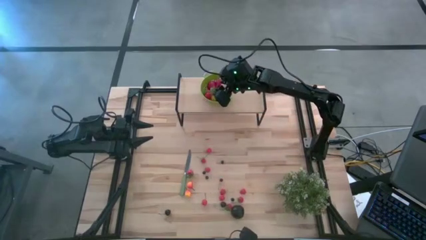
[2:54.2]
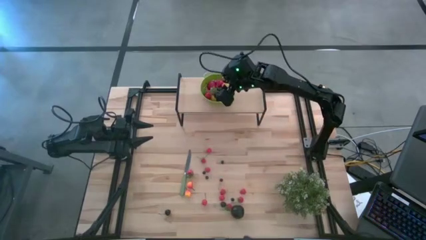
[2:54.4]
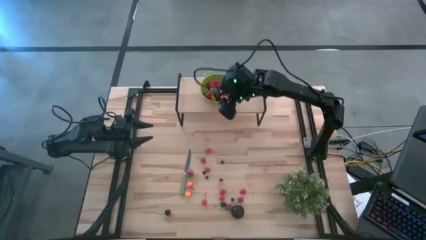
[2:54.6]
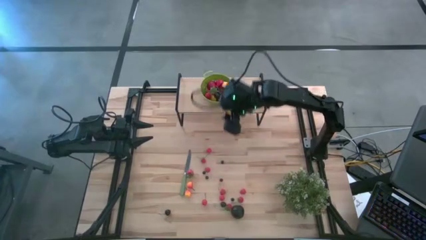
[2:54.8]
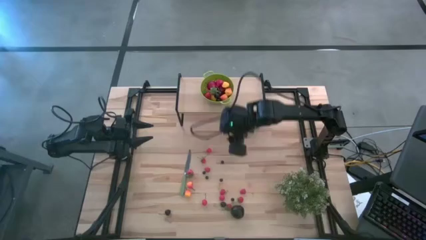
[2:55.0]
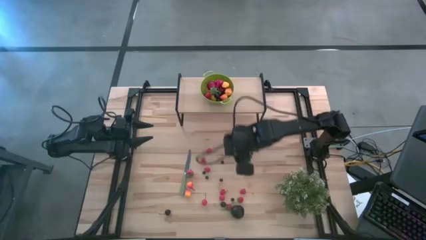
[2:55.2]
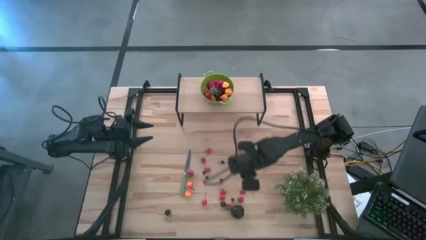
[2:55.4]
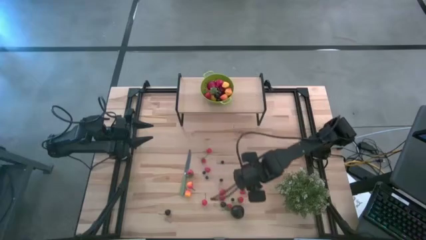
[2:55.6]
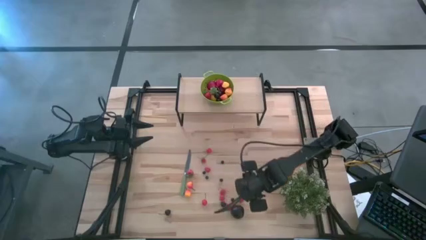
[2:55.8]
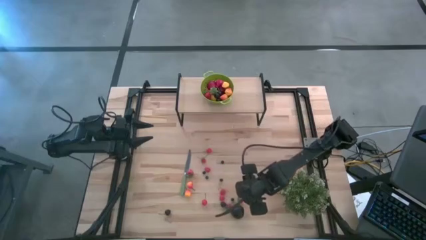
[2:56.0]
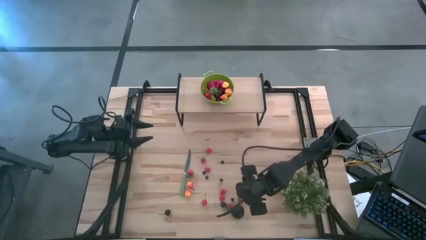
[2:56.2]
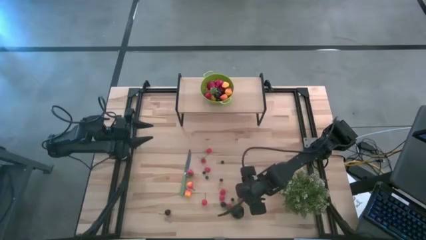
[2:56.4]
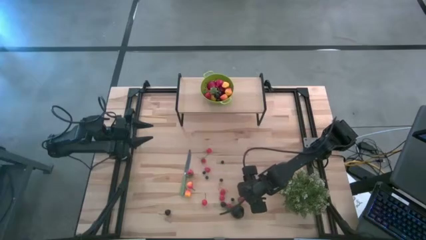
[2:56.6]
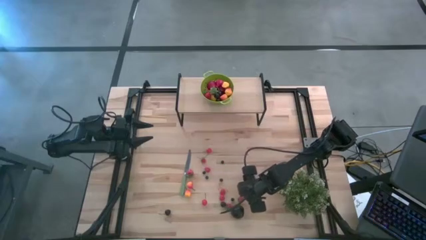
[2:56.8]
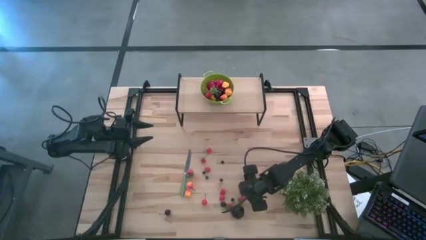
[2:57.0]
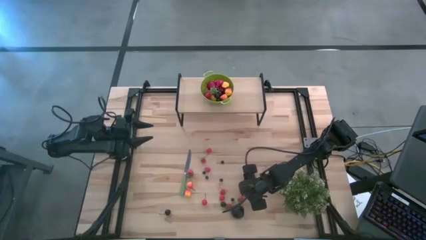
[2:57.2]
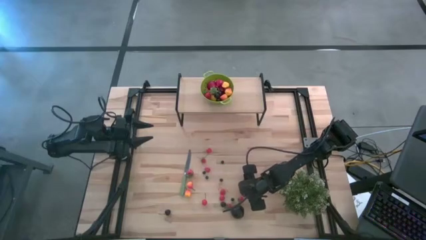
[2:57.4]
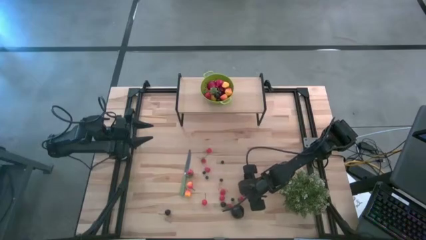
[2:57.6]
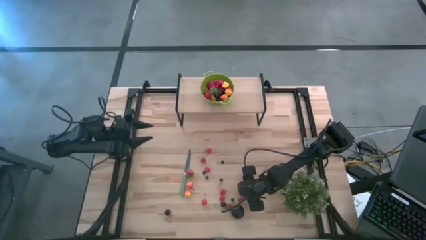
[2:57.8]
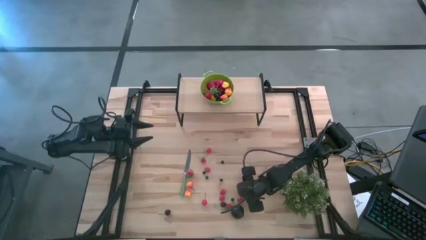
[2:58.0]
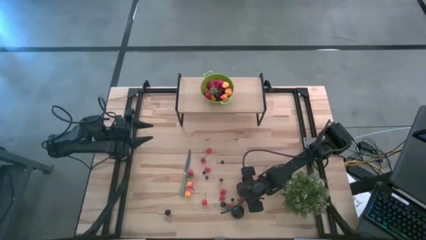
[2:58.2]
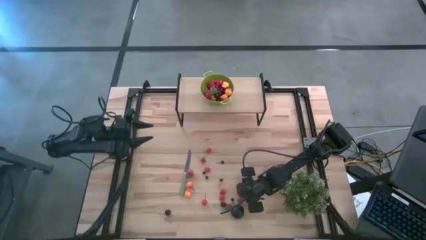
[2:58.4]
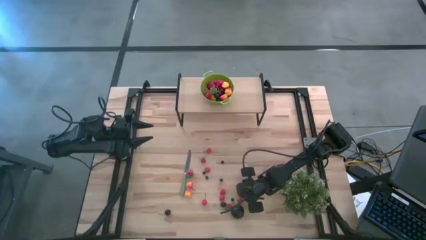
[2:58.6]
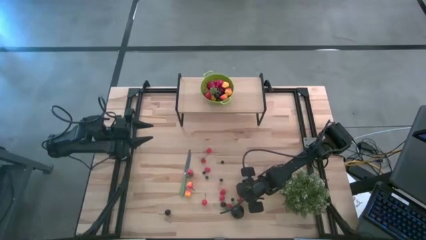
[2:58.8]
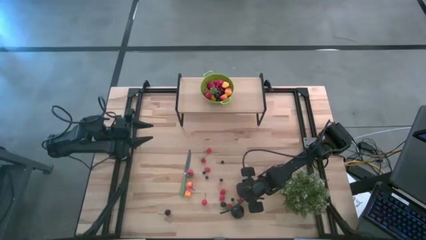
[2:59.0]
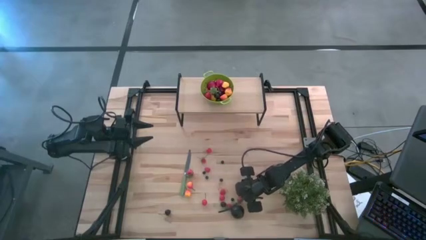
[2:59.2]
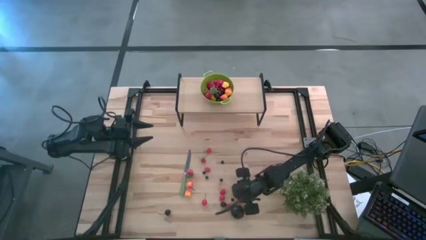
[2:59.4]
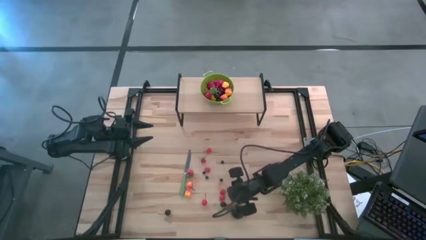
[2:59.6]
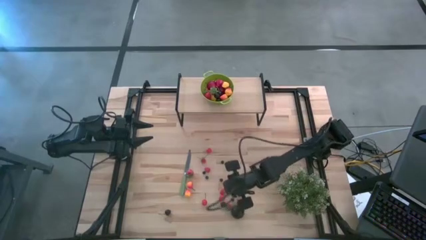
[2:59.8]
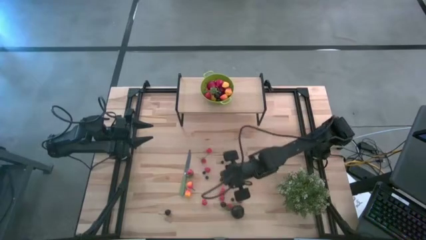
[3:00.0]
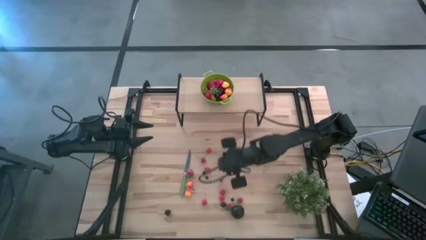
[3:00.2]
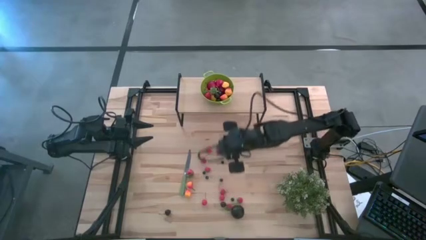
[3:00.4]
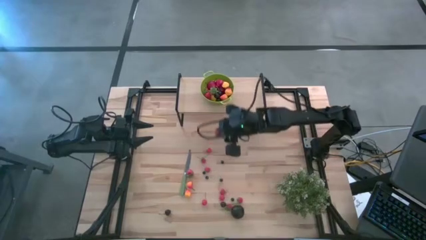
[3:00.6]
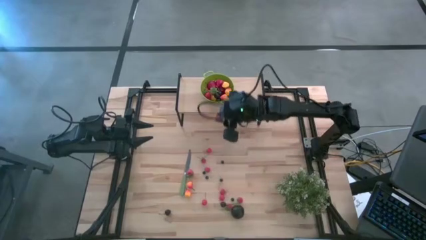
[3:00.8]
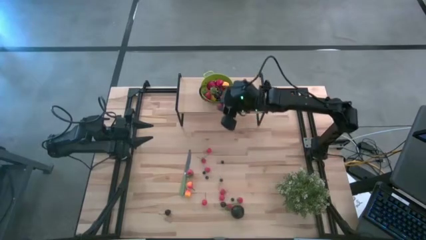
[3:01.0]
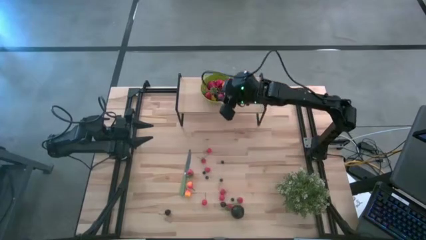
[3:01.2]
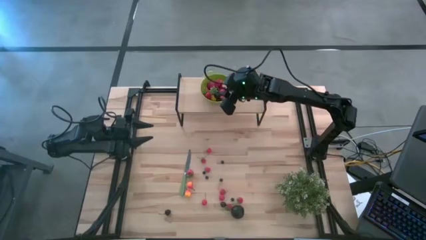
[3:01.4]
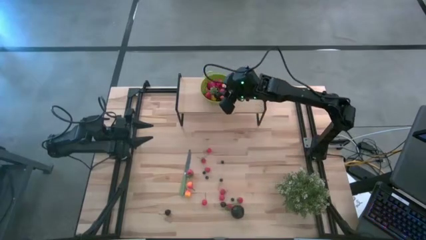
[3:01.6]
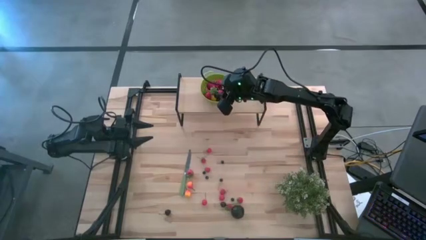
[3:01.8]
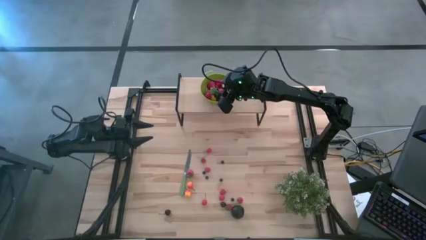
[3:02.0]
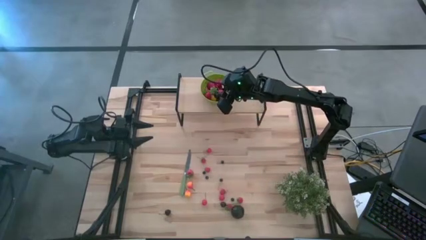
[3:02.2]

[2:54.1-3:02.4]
Task: Pick & Place Fruit
Put the raspberry into the green colander on the shelf

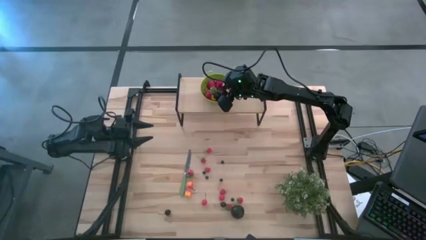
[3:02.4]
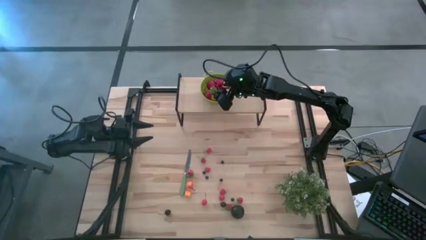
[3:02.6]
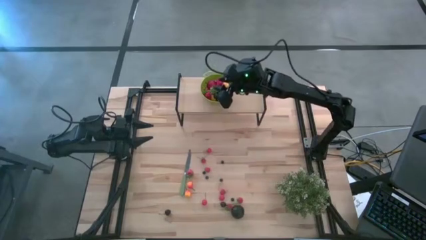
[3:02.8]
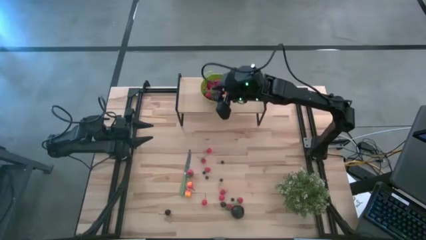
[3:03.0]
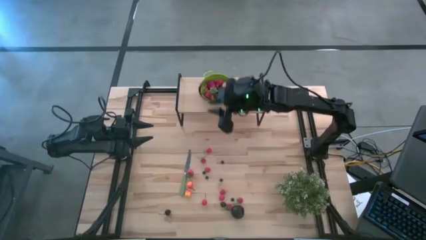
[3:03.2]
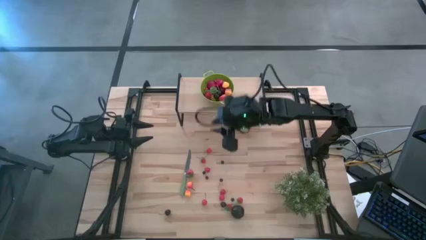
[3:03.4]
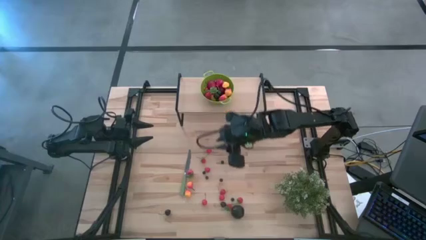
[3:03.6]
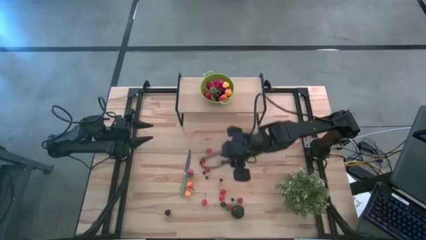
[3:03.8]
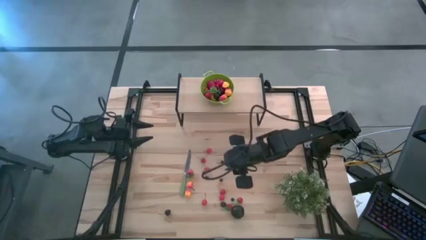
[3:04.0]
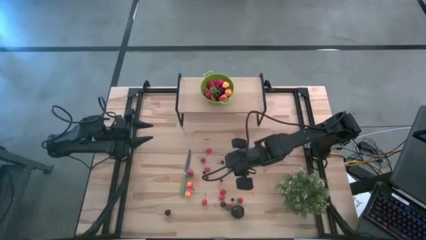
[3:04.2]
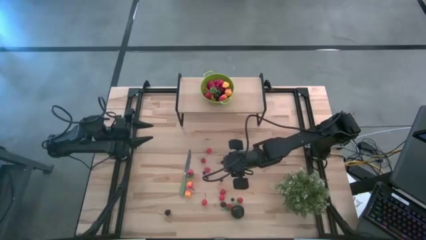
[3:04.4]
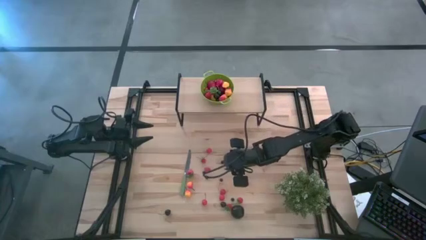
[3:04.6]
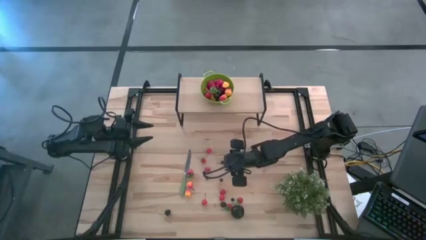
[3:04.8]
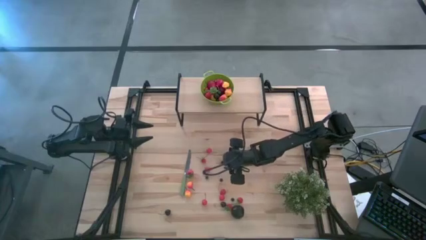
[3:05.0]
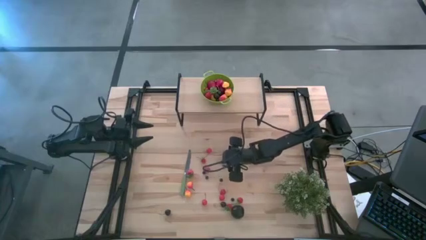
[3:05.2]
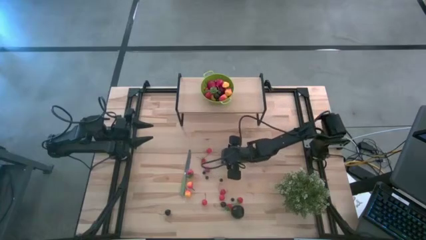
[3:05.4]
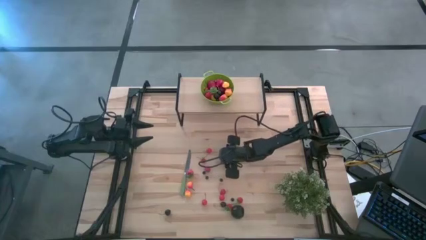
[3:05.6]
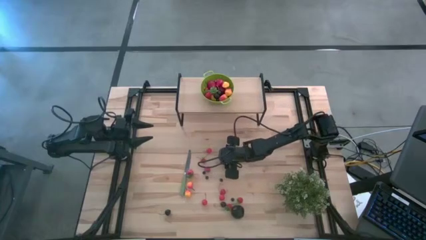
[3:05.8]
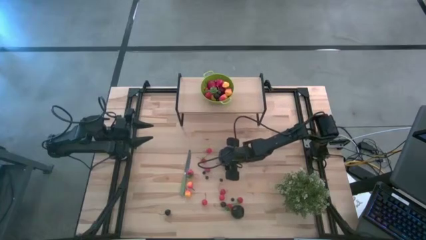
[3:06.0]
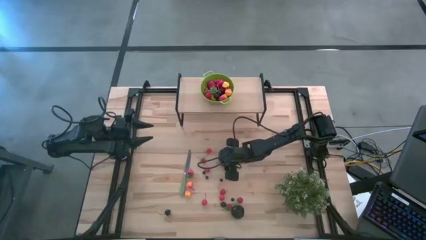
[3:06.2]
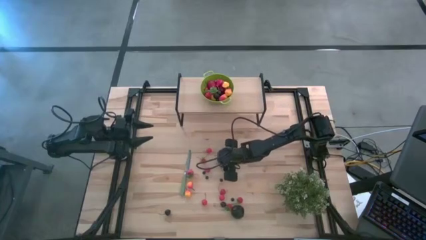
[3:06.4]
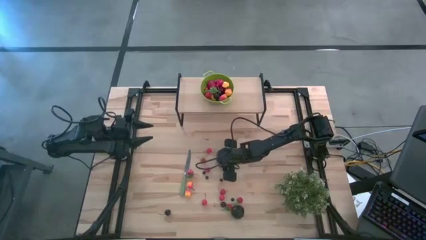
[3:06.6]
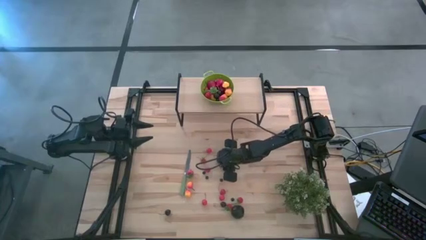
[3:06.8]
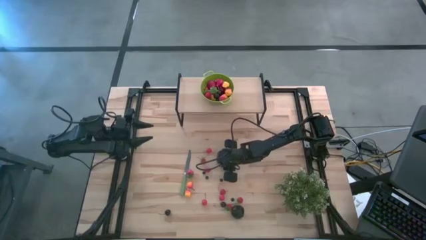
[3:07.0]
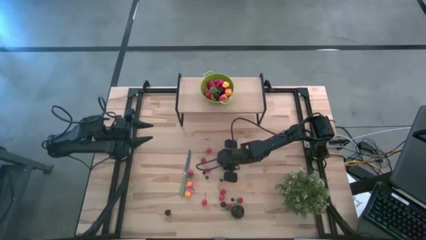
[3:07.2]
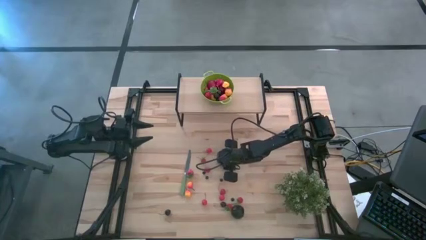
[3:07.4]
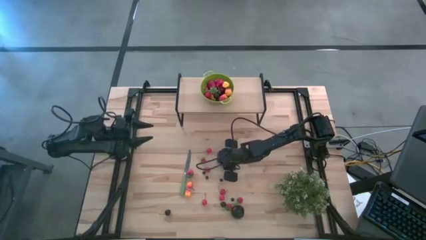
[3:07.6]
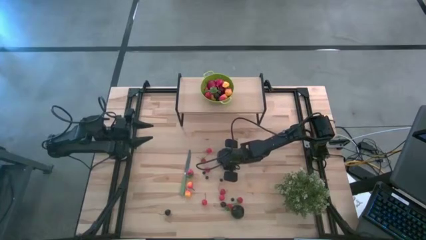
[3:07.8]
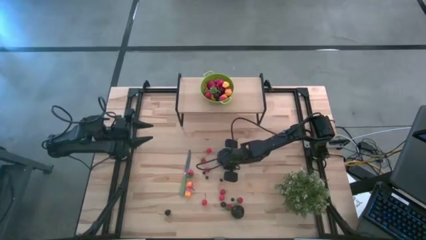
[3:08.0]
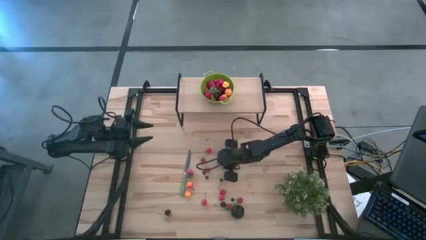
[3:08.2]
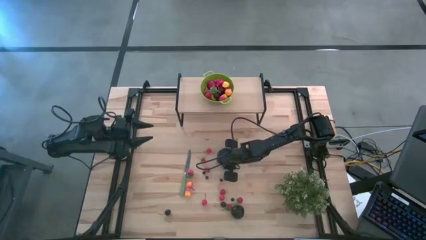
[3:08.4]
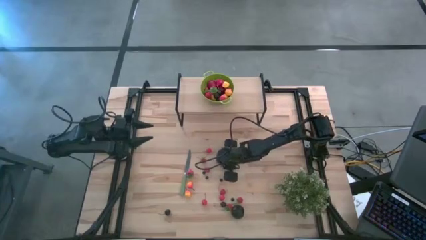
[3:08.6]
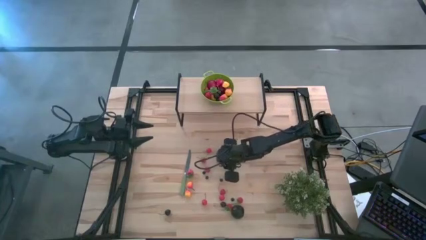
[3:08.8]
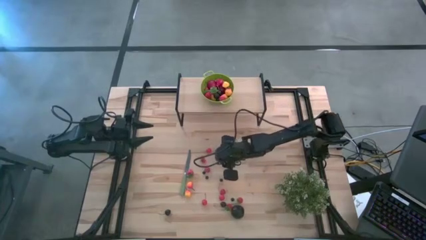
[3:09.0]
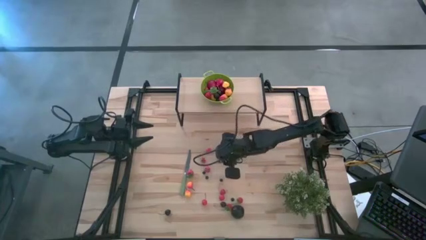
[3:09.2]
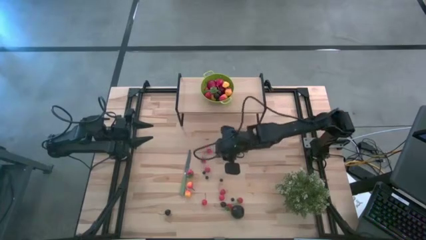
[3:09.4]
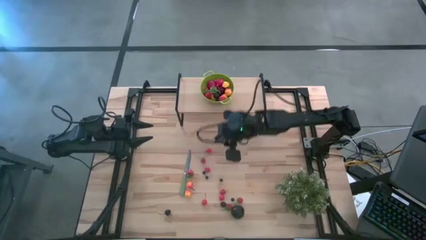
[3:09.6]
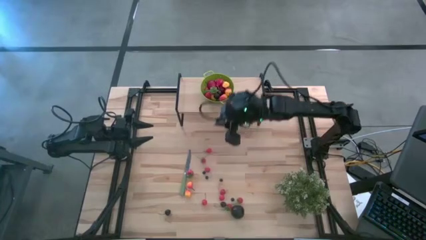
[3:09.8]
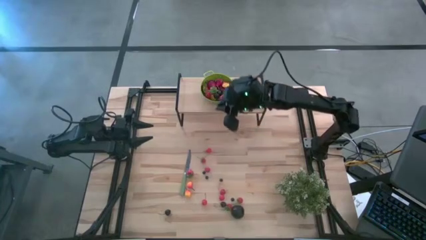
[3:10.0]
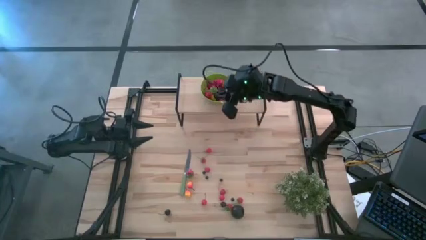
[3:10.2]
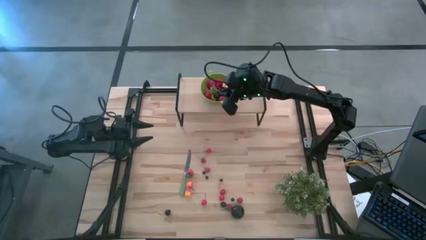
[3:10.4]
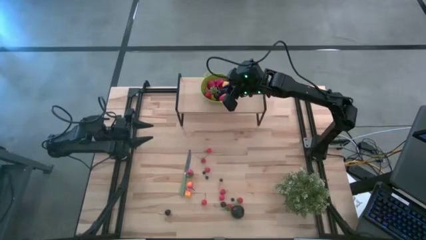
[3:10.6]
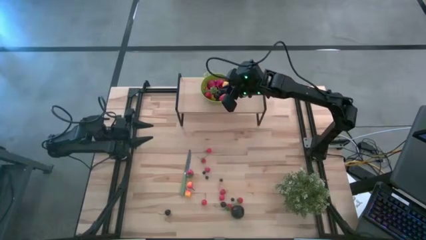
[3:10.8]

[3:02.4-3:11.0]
Put the blueberry into the green colander on the shelf
